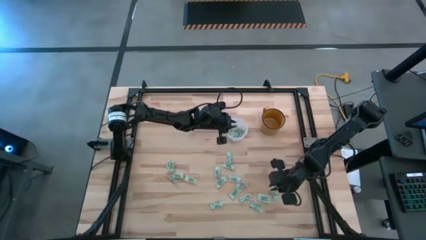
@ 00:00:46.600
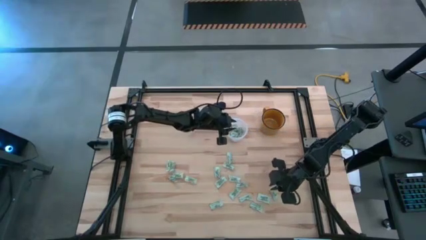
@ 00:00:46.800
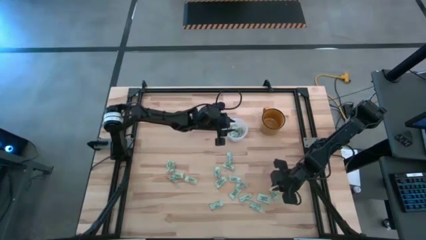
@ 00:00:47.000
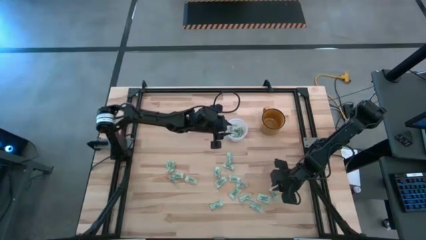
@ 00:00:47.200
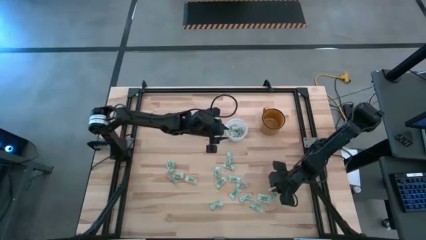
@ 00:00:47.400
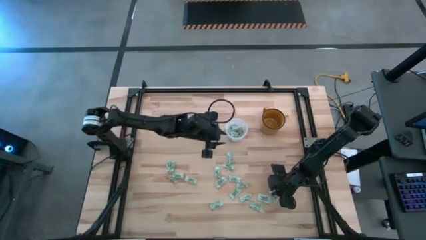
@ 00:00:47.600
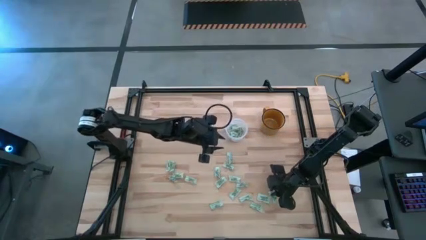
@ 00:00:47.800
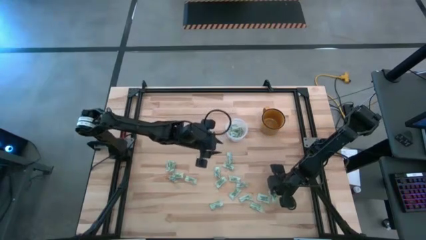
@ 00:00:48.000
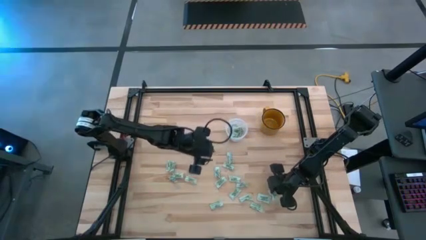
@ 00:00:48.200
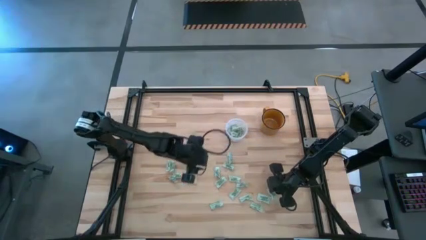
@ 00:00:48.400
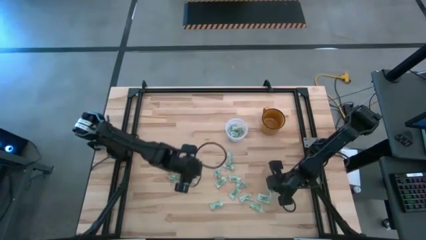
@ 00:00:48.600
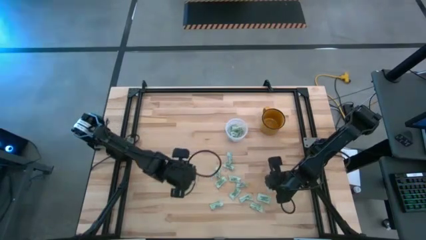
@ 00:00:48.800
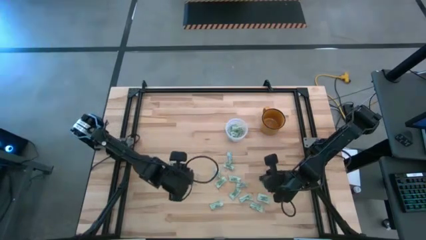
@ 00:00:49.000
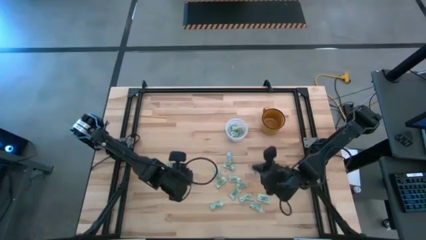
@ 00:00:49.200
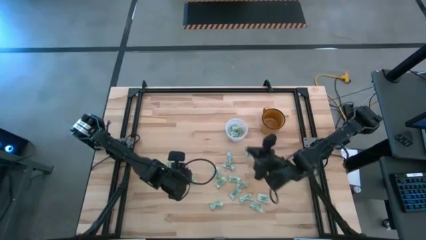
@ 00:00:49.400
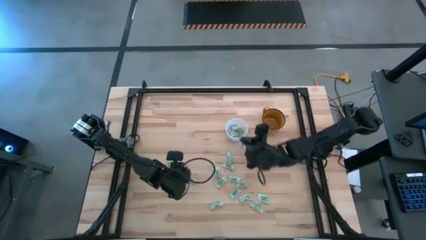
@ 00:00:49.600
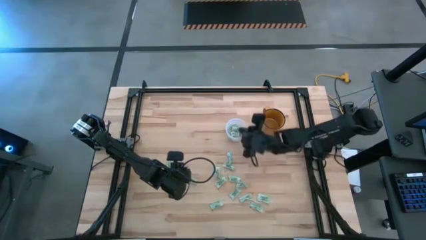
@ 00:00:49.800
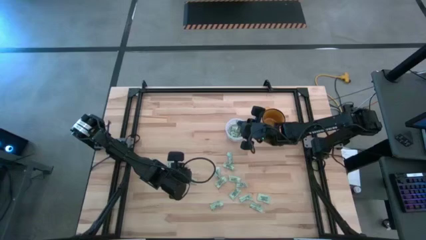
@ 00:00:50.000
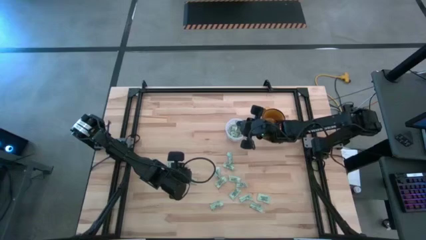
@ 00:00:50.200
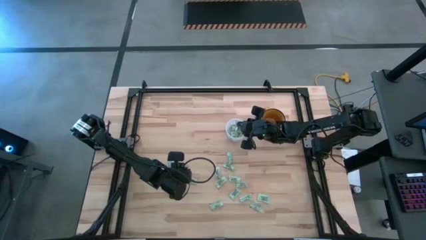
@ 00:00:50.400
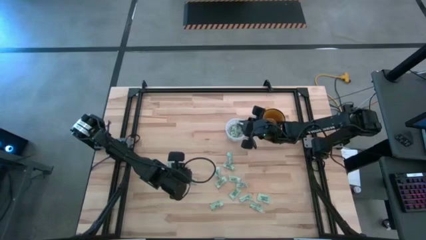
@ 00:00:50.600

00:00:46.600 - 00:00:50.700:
Task: Pick and place Stevia / Truvia into bins
Put the green stevia packet into the transparent bin

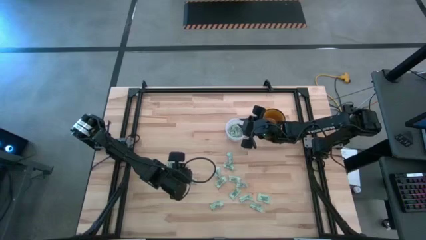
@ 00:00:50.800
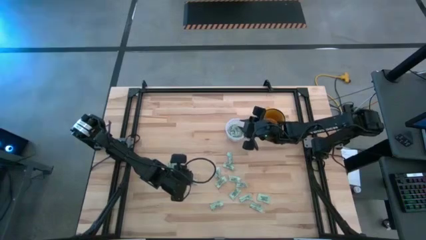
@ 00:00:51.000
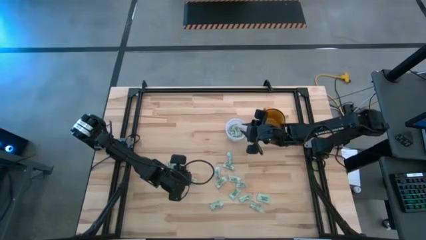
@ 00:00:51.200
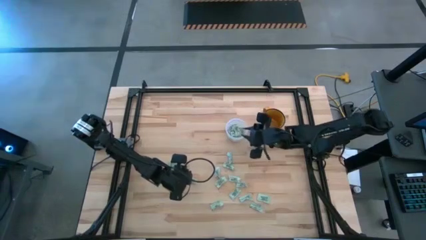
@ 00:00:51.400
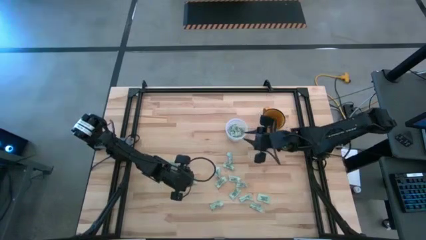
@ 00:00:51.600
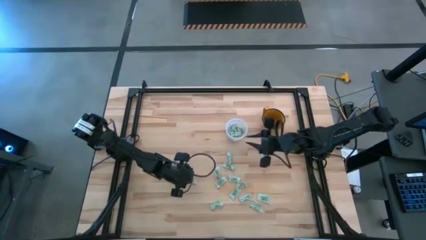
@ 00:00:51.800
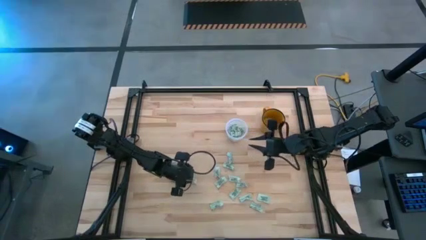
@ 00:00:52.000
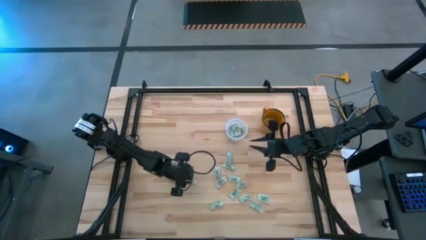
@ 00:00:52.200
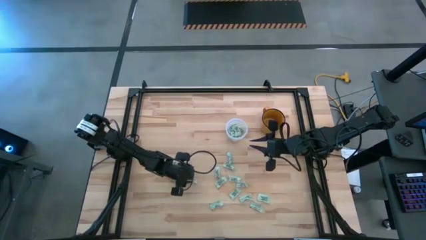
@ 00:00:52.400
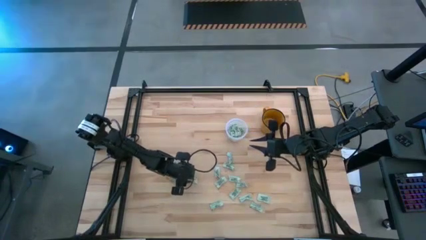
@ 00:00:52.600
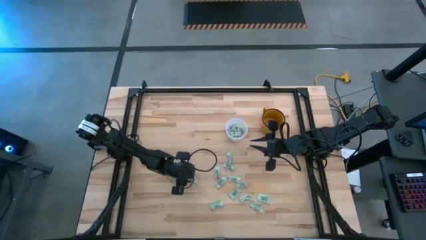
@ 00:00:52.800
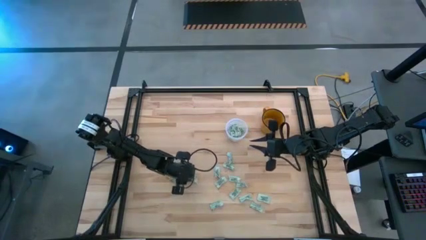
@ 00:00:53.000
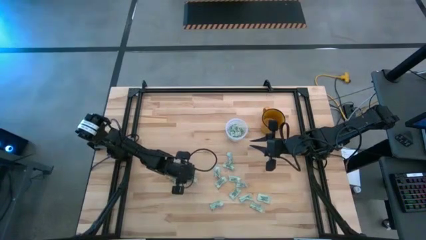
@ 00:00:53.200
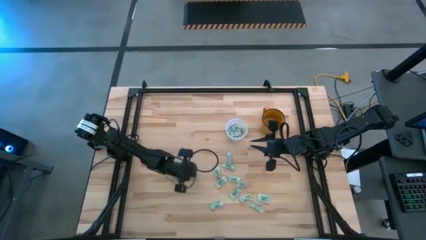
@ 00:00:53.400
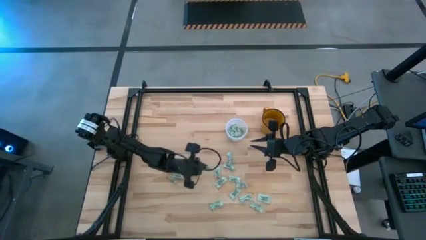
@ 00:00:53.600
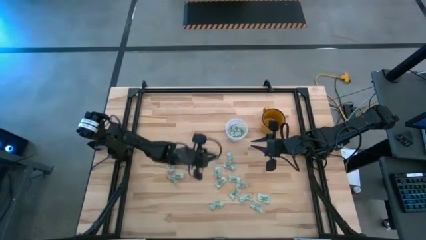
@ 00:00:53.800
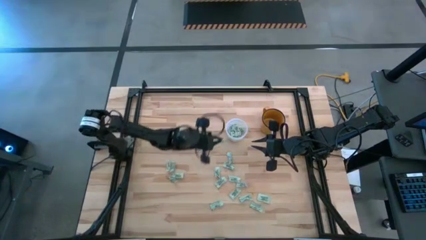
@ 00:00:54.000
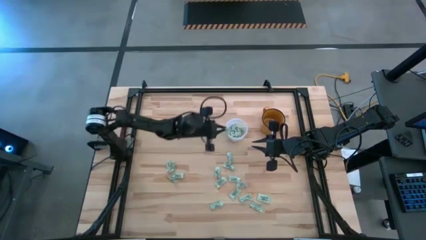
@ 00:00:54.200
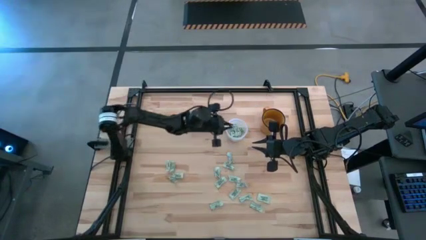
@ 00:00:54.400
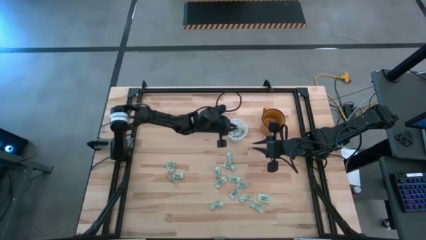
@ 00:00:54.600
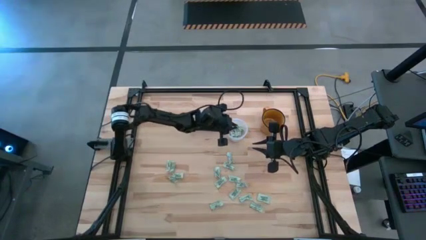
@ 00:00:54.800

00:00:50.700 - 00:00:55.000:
Put the green stevia packet into the transparent bin

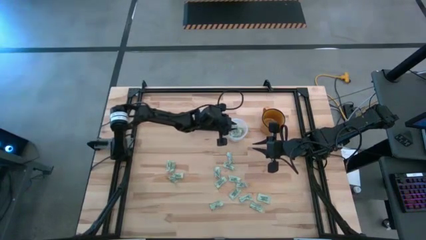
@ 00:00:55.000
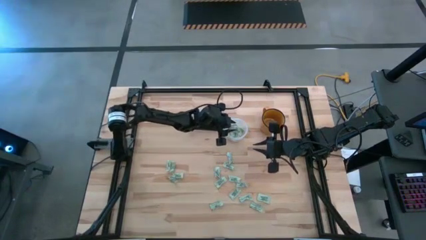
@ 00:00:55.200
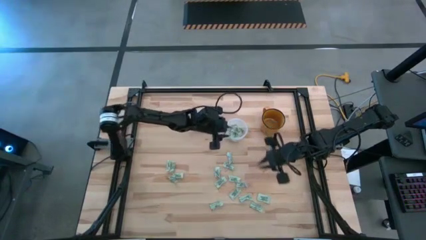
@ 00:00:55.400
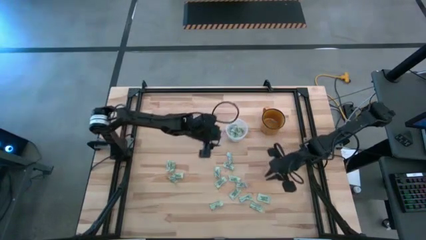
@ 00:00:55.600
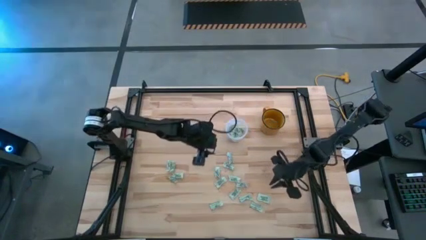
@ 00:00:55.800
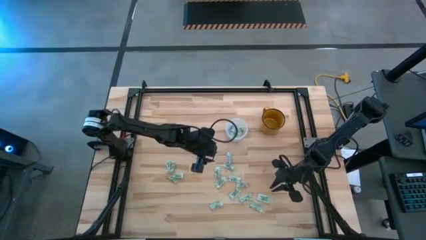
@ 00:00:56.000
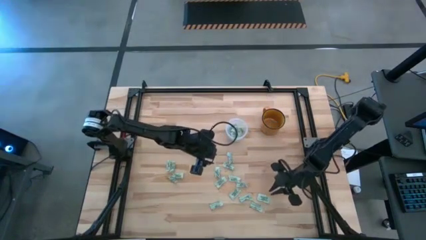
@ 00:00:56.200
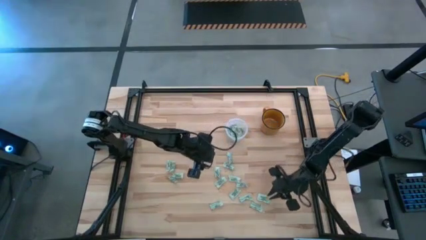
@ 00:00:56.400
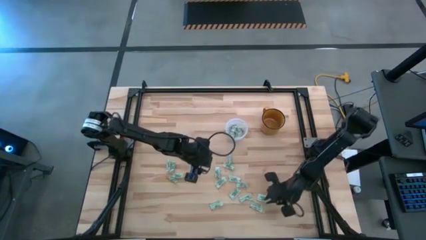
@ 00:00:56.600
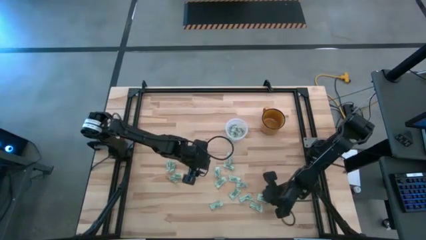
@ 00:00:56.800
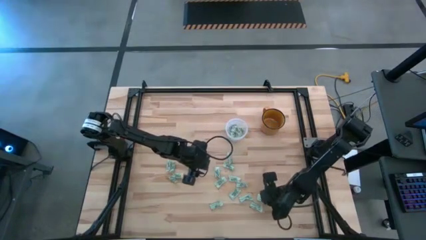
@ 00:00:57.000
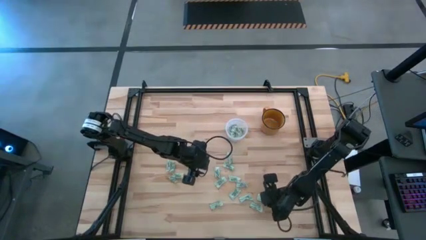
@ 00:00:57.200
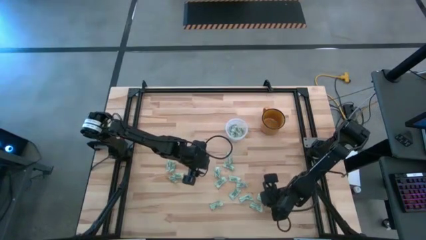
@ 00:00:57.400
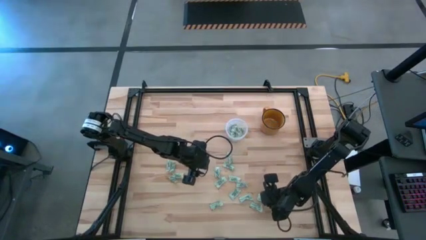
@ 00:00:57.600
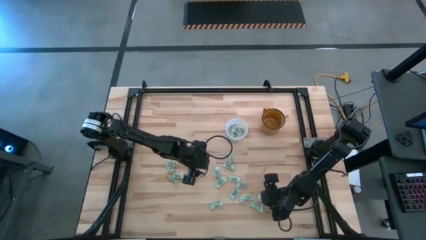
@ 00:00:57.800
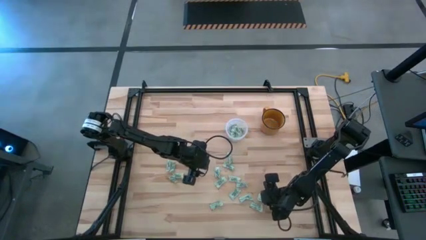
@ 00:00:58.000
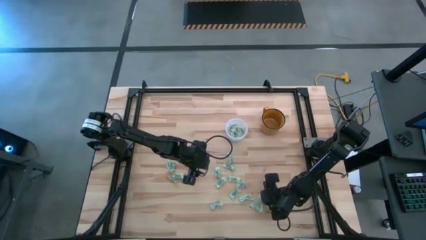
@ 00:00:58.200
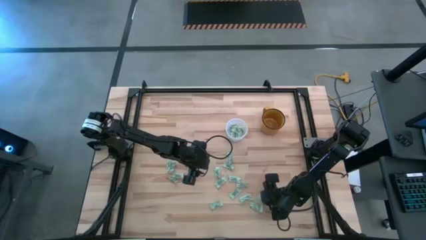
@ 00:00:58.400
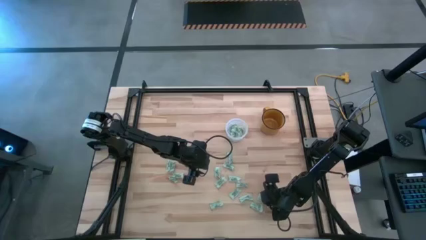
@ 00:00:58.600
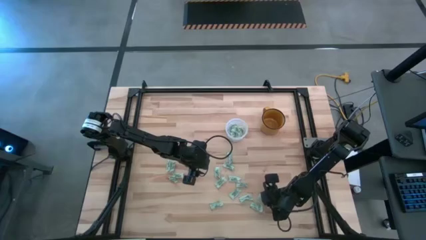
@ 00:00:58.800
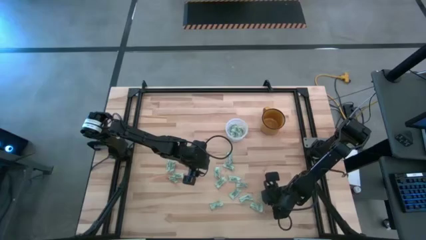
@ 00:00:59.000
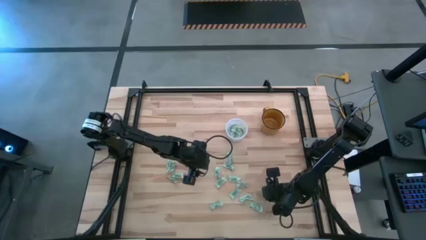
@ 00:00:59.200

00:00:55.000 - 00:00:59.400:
Put the green stevia packet into the transparent bin

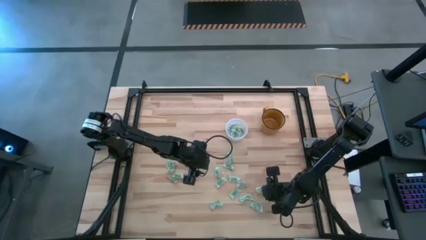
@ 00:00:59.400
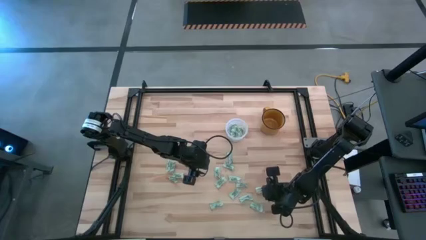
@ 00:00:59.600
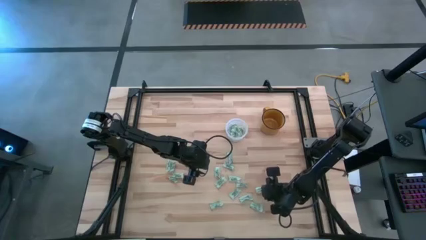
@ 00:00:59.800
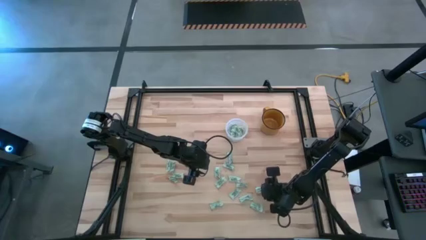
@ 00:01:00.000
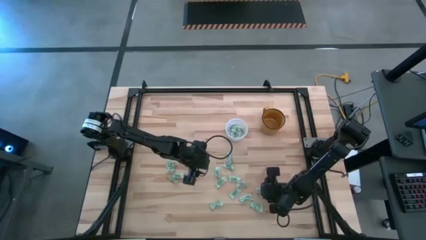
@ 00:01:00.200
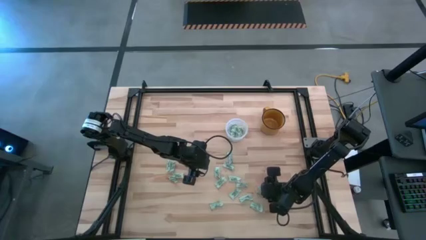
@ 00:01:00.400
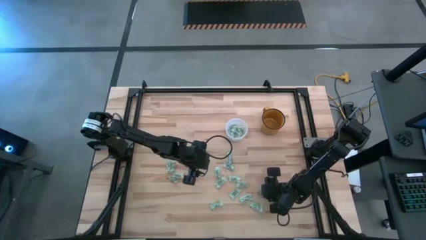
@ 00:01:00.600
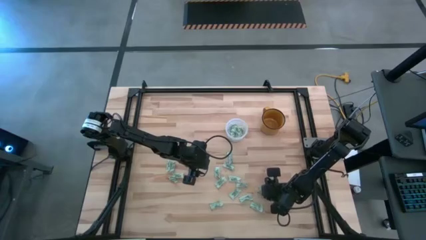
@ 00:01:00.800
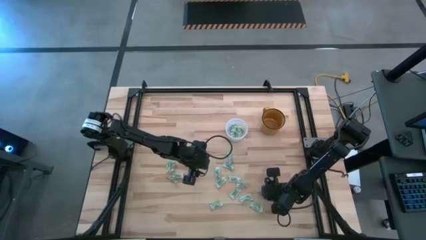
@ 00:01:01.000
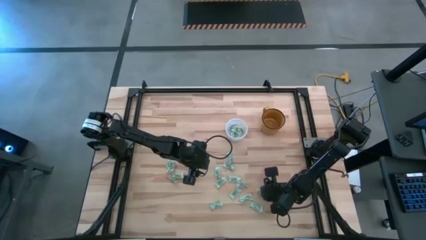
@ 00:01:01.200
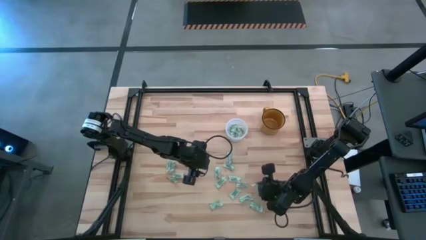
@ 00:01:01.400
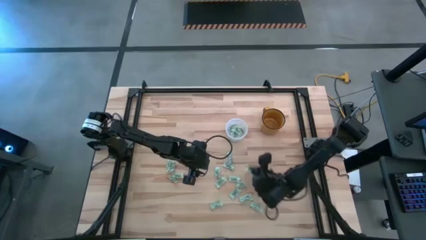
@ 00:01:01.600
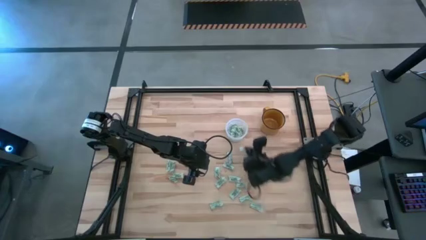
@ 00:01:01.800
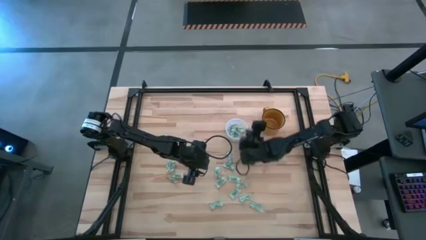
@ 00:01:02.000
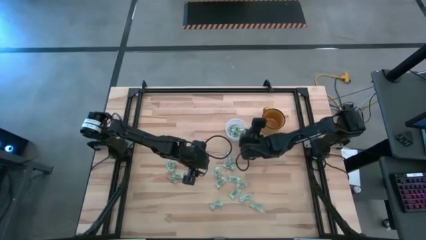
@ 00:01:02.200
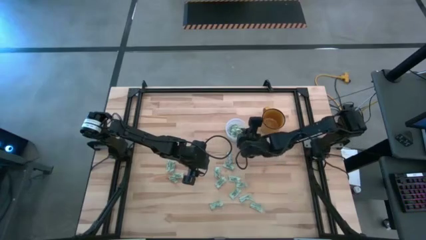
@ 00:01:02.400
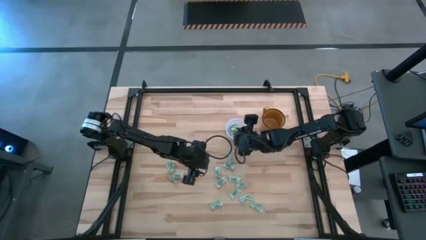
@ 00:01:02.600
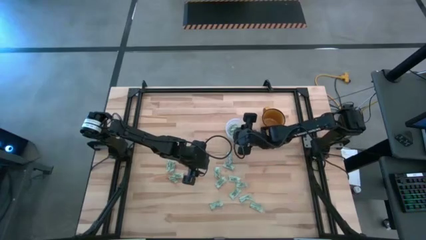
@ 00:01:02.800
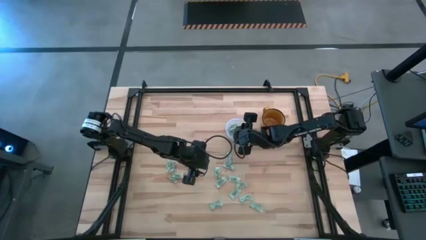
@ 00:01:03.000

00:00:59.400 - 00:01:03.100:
Put the green stevia packet into the transparent bin
